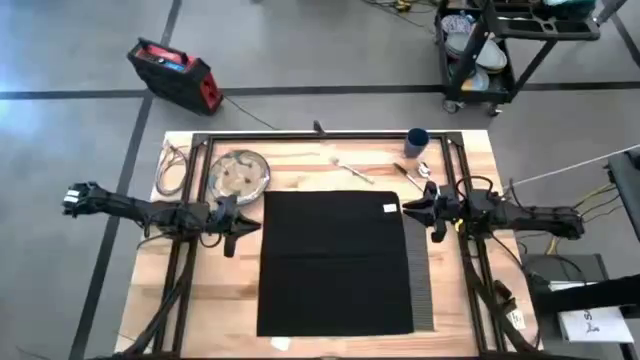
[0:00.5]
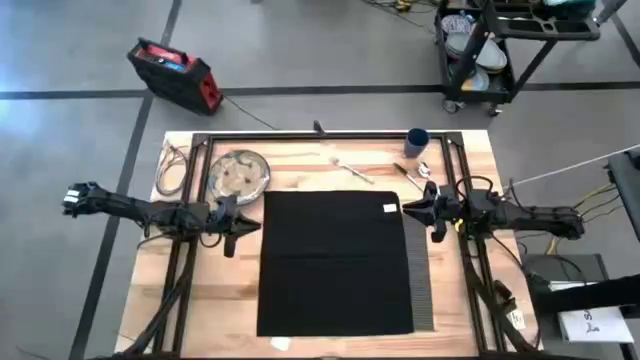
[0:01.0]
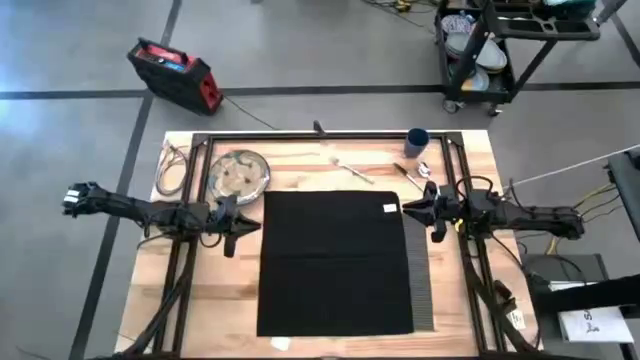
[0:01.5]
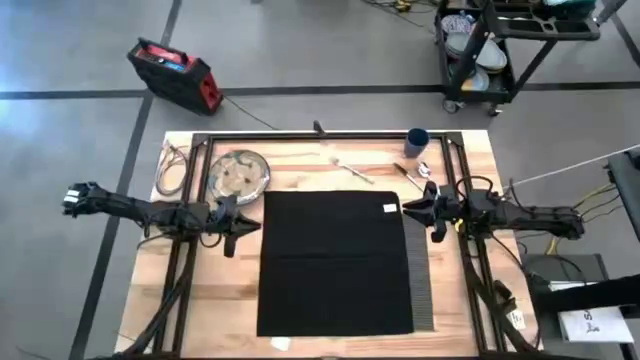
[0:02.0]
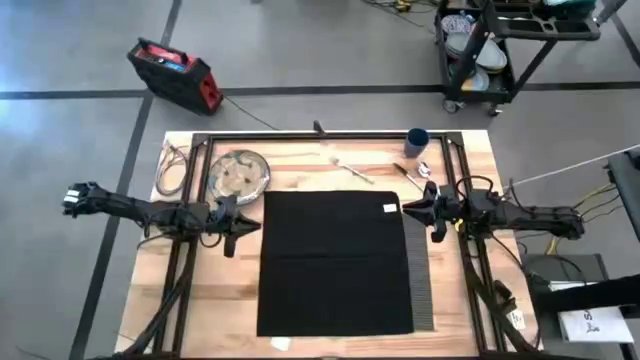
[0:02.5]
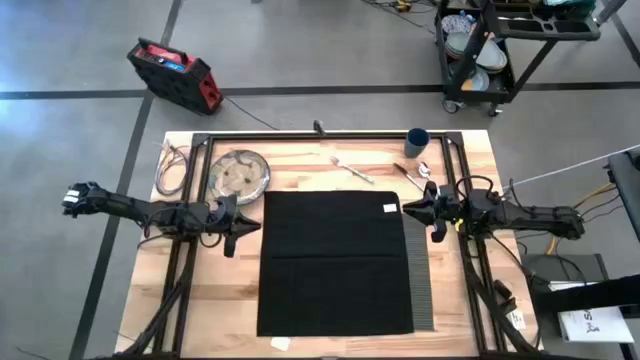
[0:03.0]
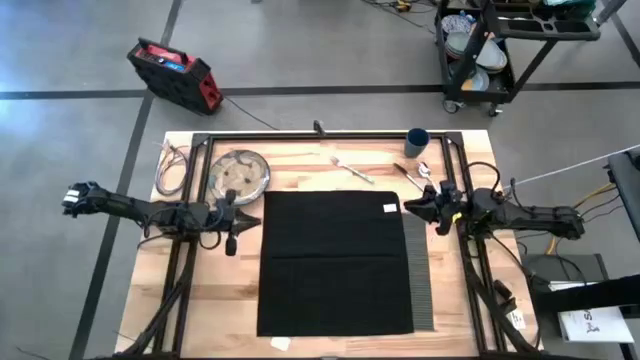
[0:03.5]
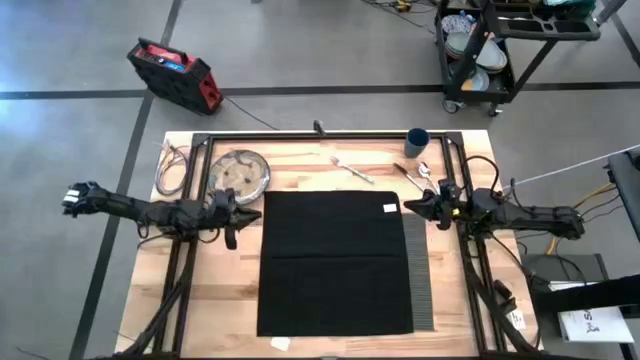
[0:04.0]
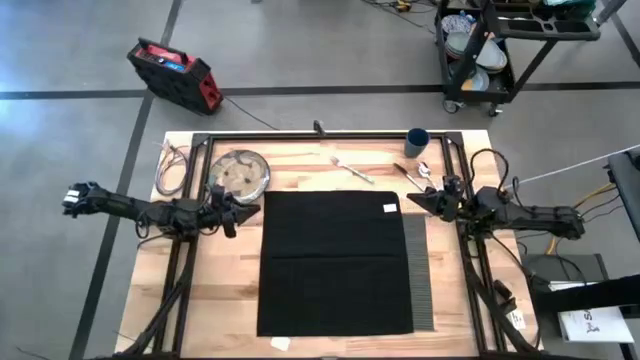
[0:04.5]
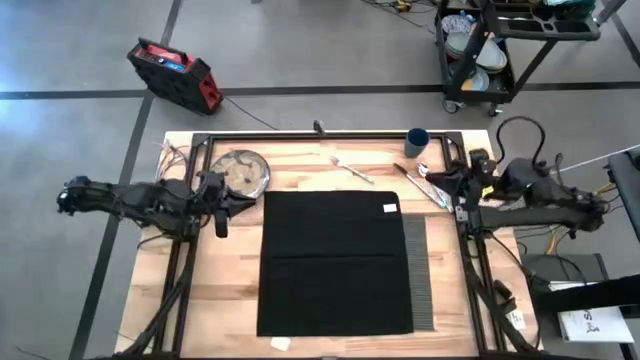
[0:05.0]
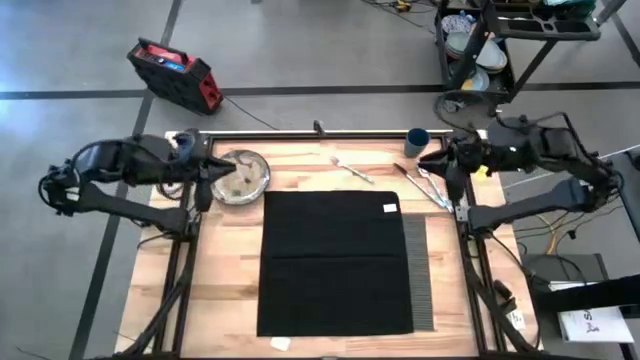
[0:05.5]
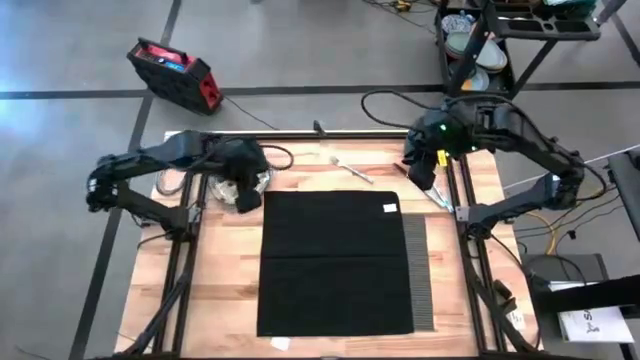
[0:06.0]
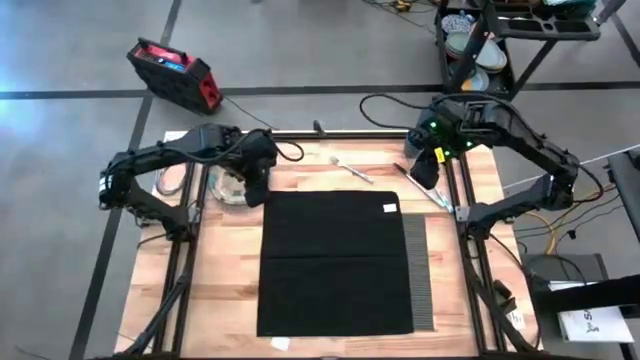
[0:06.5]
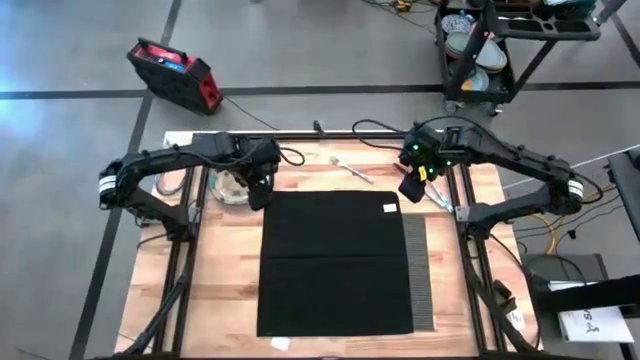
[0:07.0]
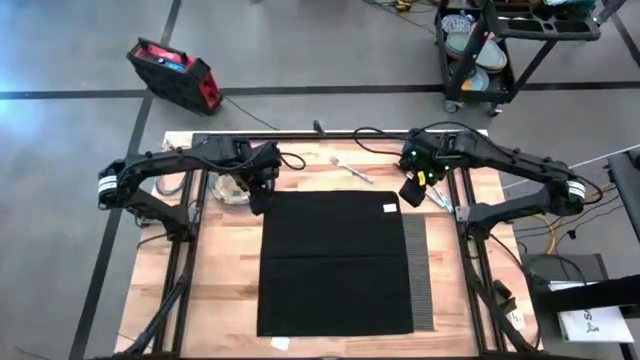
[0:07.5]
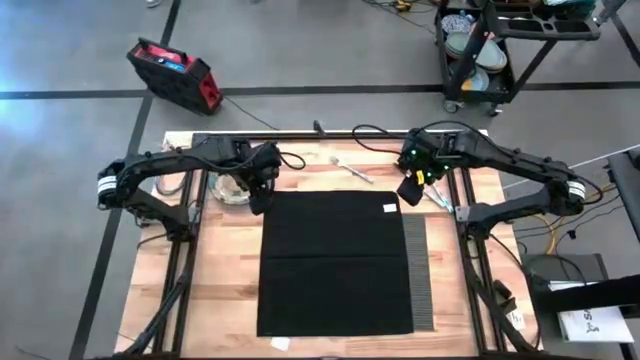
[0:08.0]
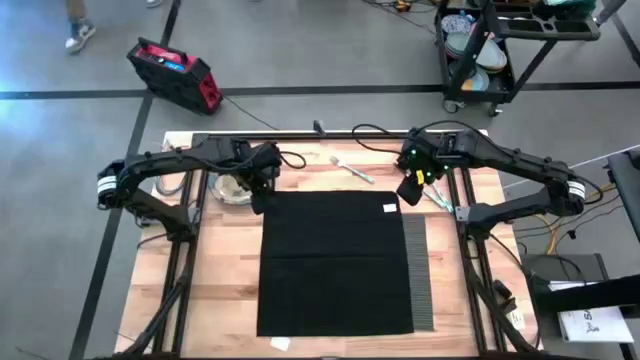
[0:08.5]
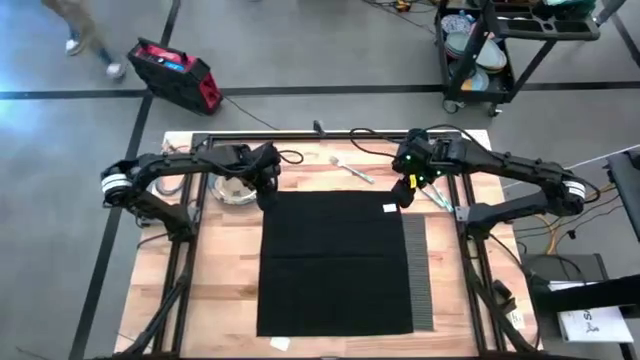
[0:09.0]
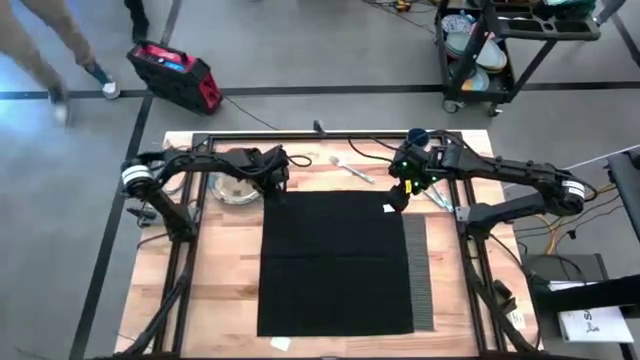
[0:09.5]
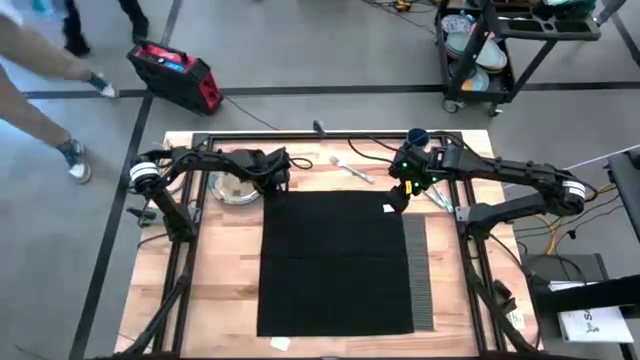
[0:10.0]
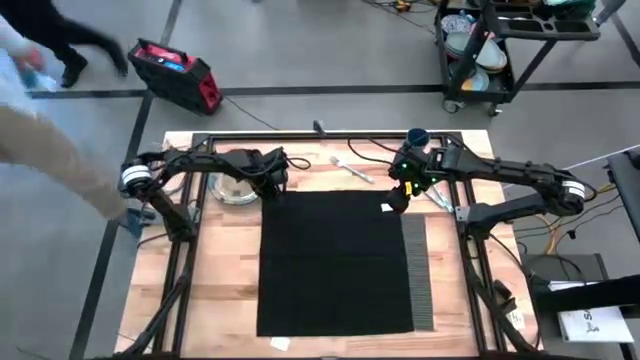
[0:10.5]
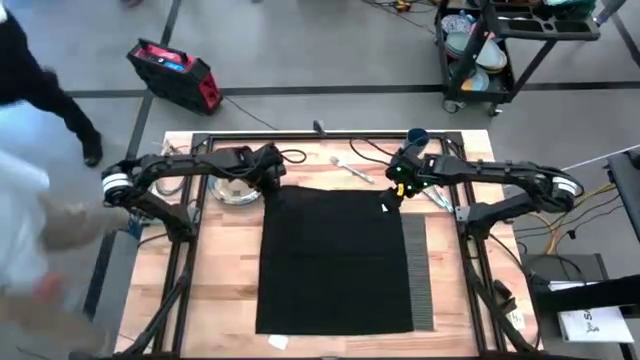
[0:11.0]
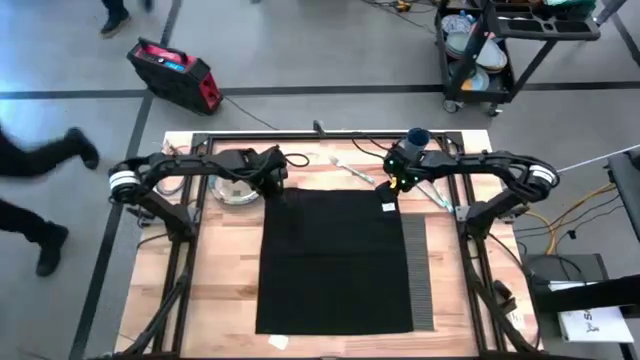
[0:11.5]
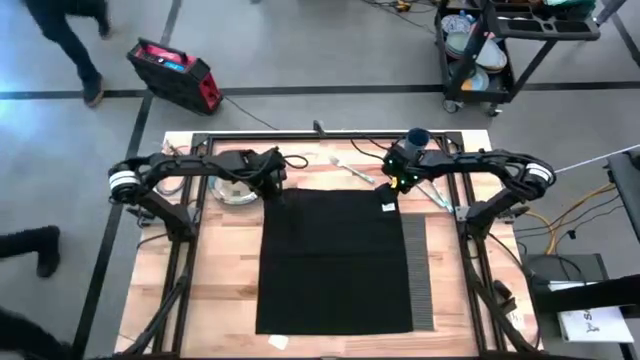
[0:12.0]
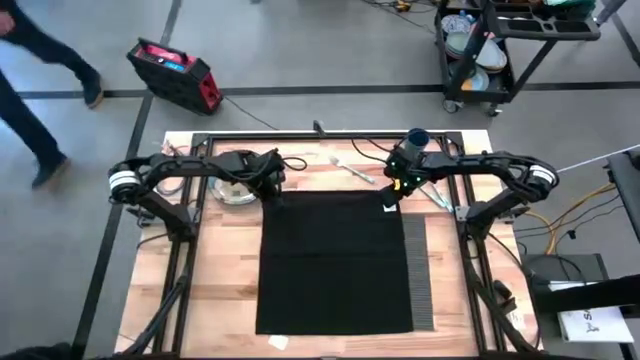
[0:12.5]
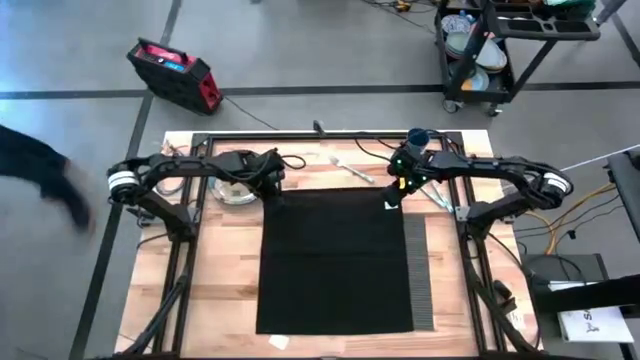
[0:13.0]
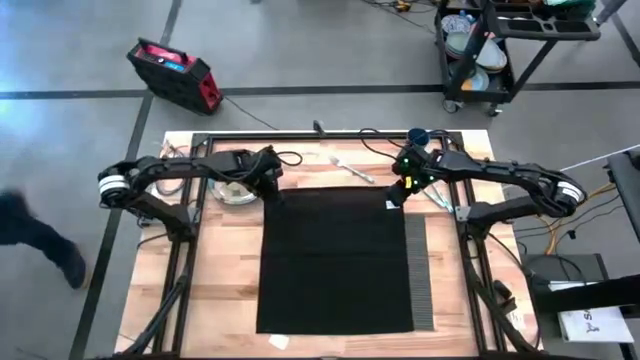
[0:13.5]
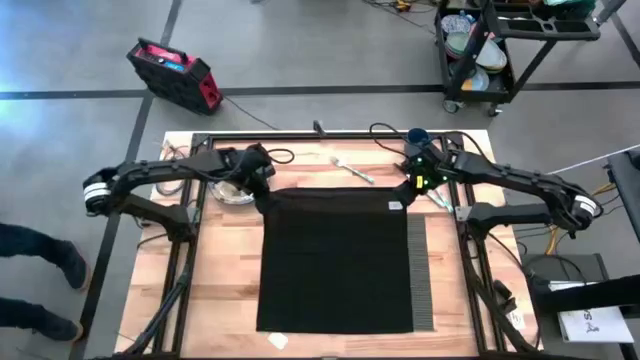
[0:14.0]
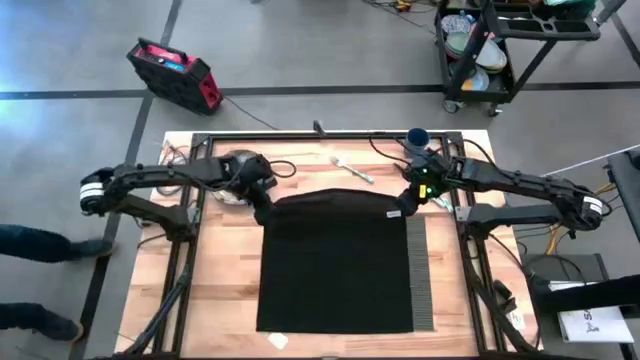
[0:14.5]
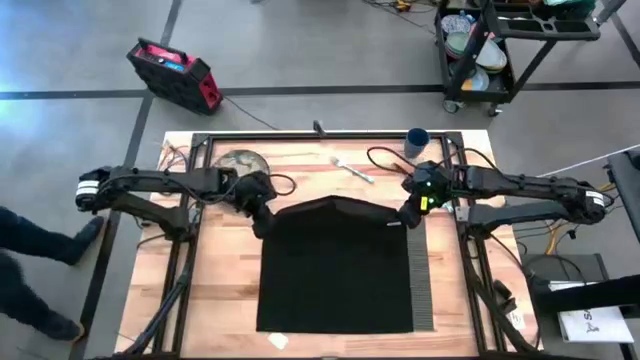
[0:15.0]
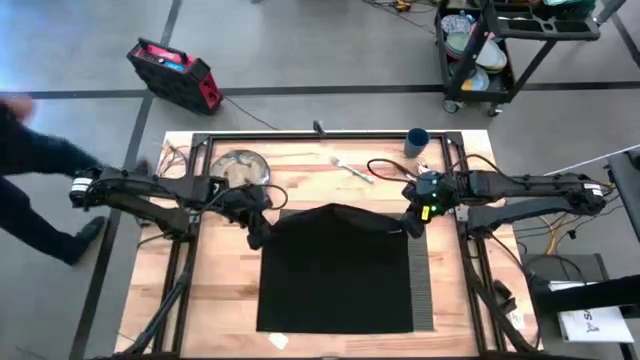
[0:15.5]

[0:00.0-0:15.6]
Task: Set table place
Fold the black napkin
